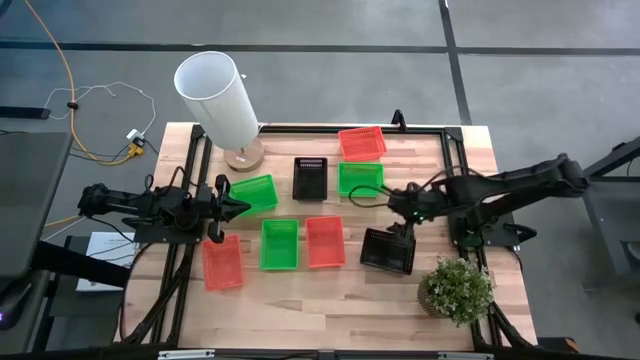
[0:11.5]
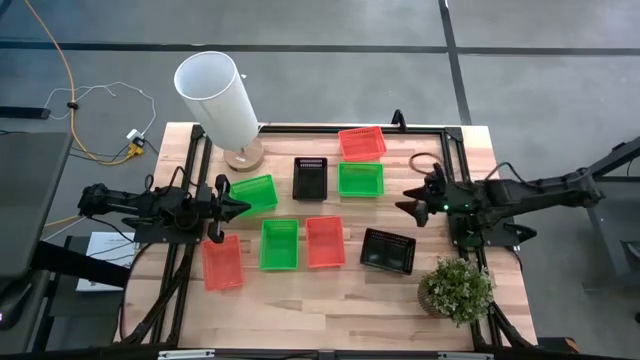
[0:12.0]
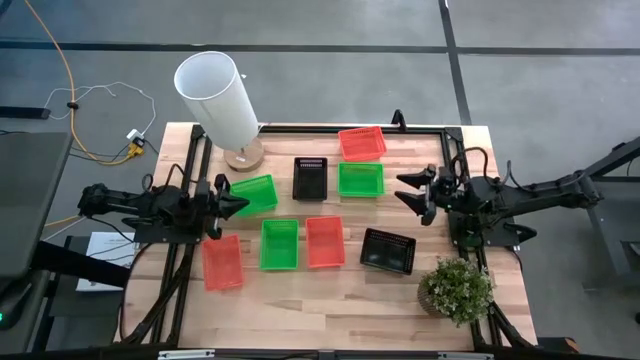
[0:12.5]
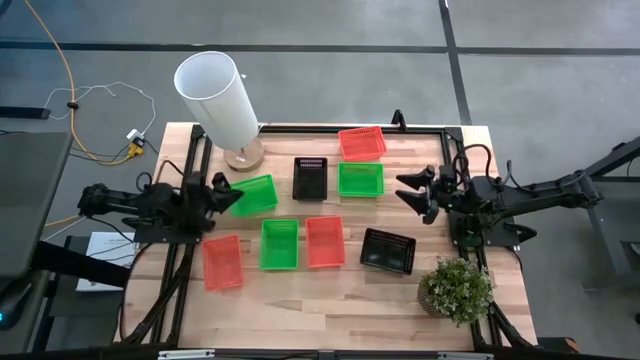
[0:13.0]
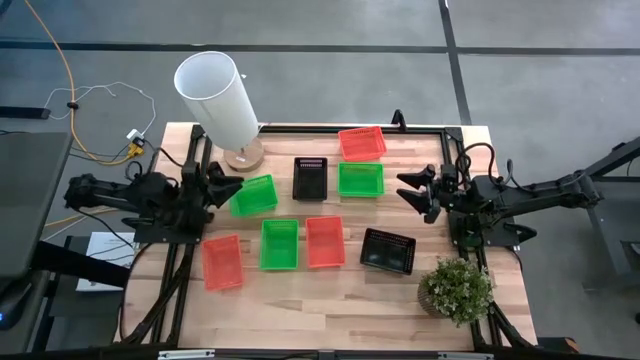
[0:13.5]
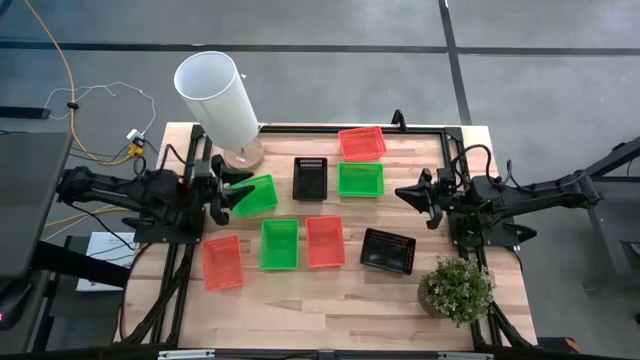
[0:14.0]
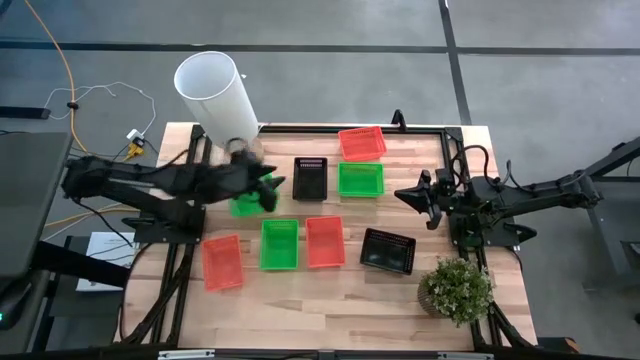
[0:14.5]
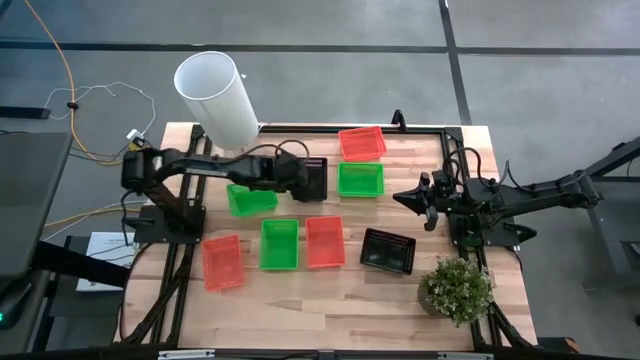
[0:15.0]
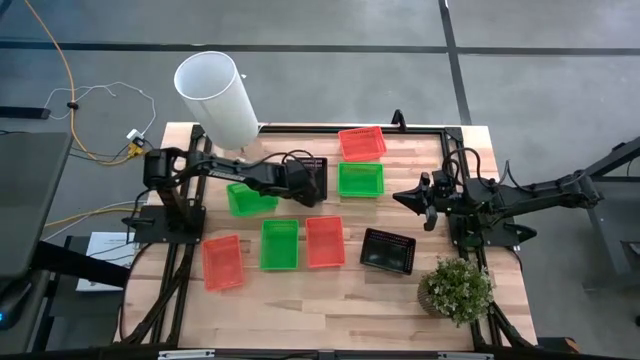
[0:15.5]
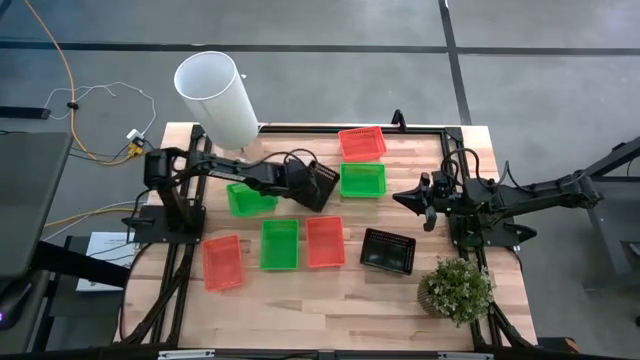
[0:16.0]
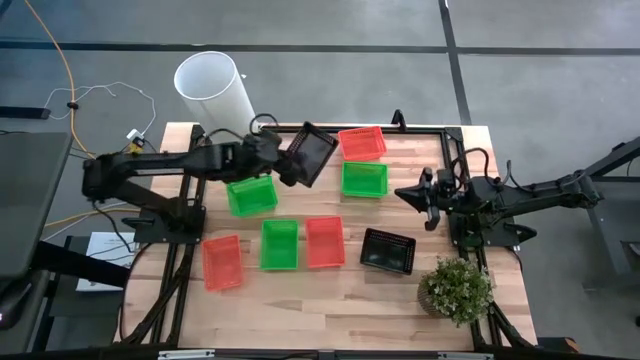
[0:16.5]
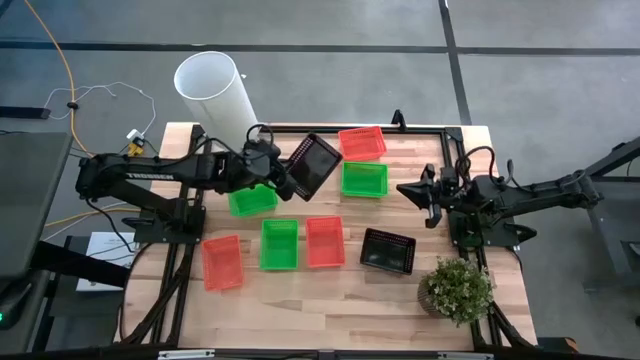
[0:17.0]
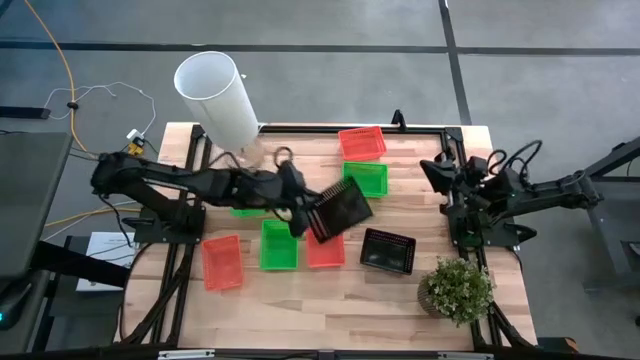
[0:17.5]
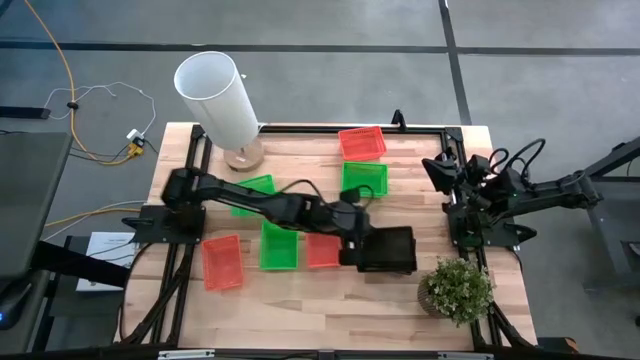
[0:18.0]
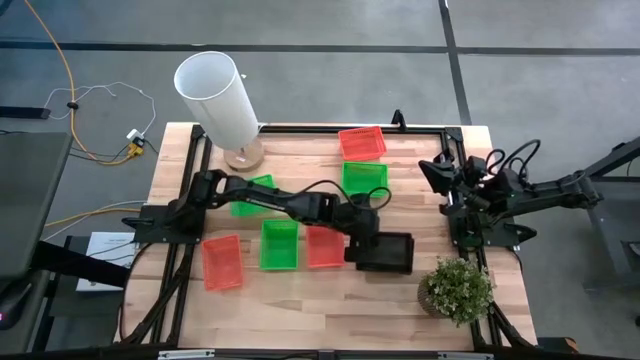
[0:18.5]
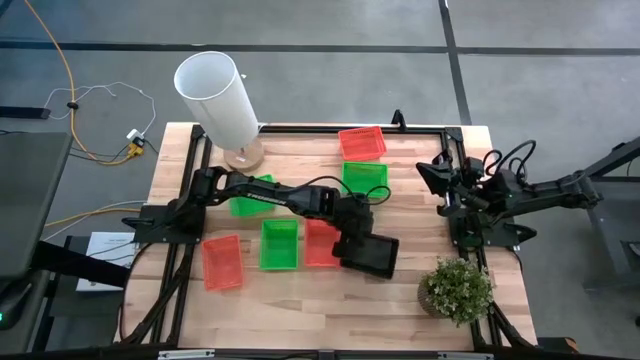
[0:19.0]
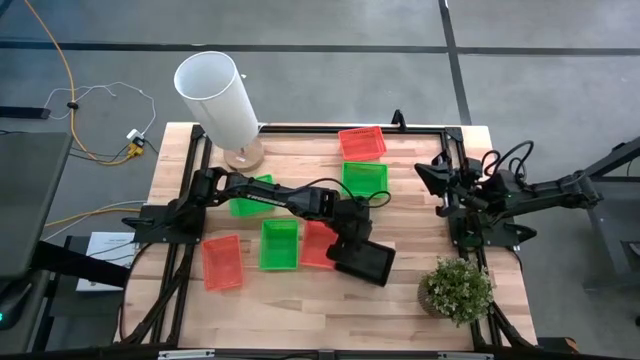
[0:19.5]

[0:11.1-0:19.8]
Stack the black bin on the black bin

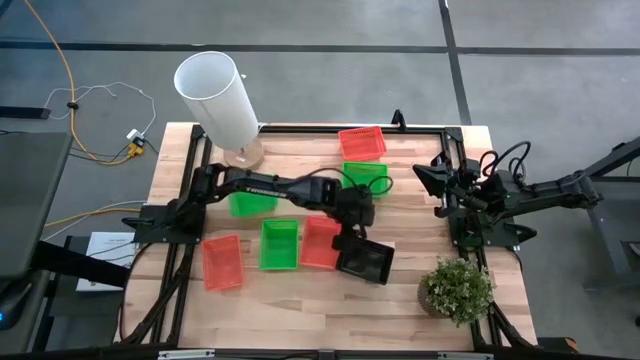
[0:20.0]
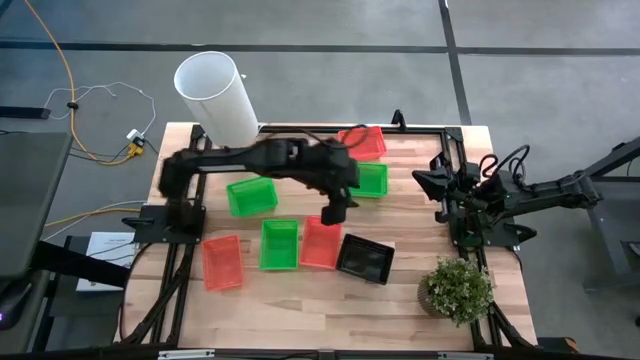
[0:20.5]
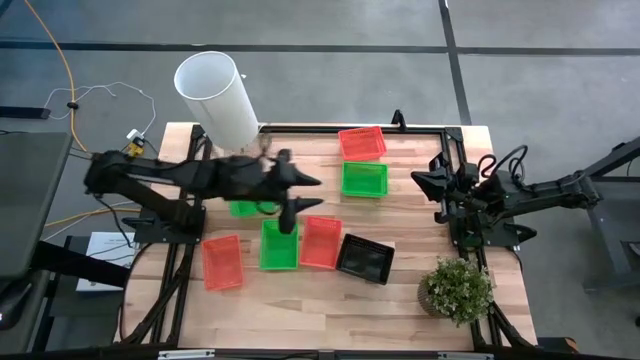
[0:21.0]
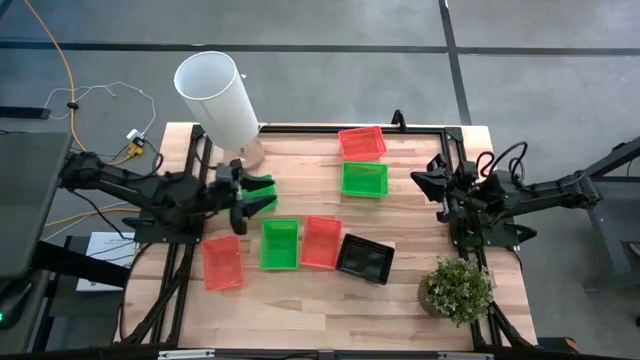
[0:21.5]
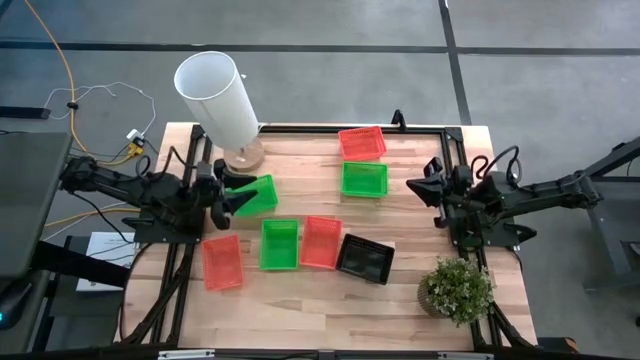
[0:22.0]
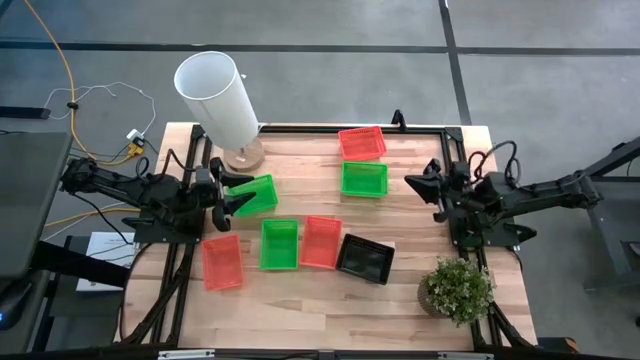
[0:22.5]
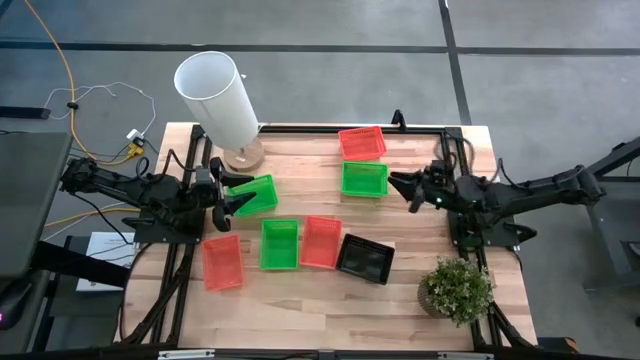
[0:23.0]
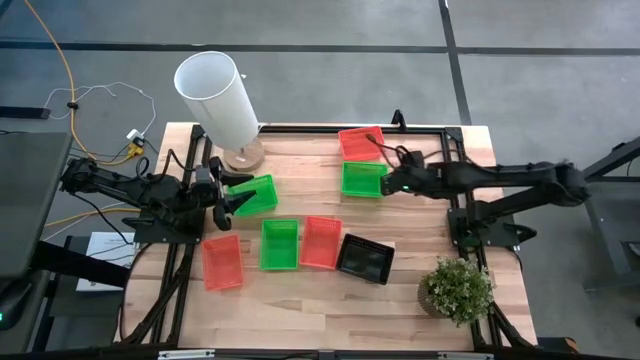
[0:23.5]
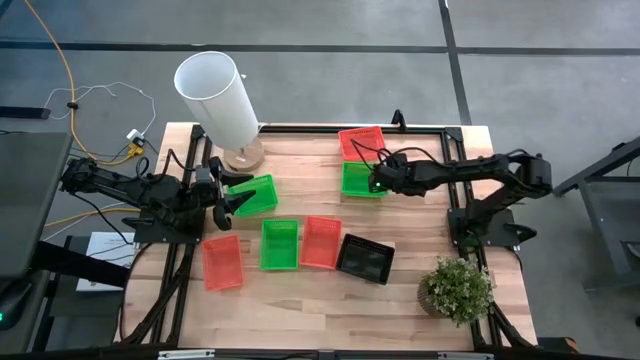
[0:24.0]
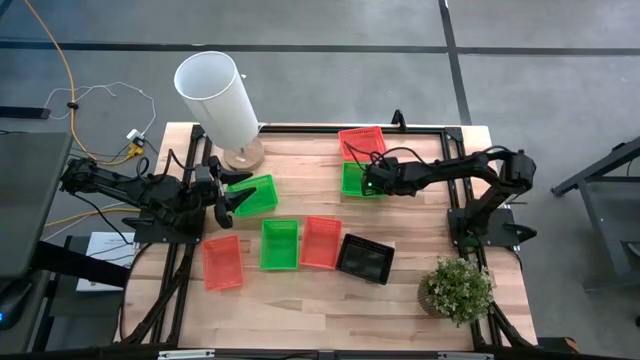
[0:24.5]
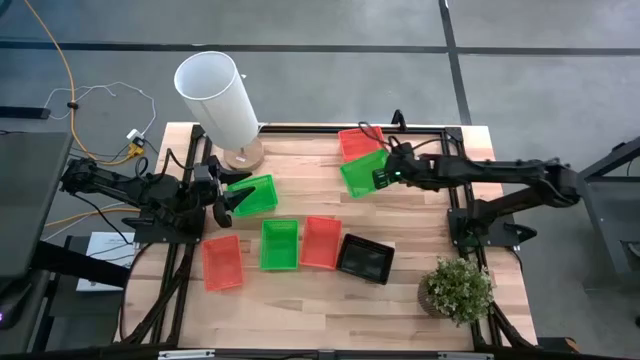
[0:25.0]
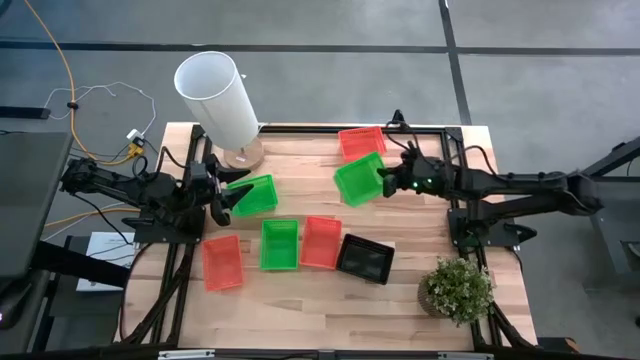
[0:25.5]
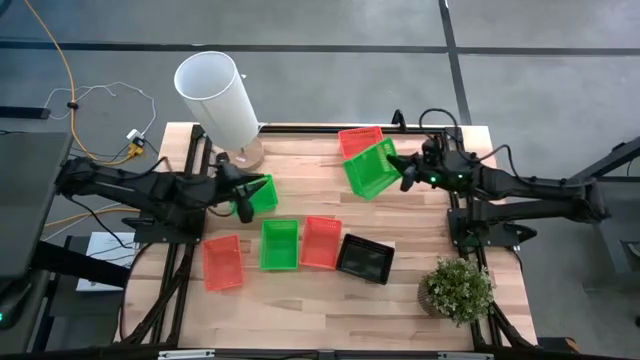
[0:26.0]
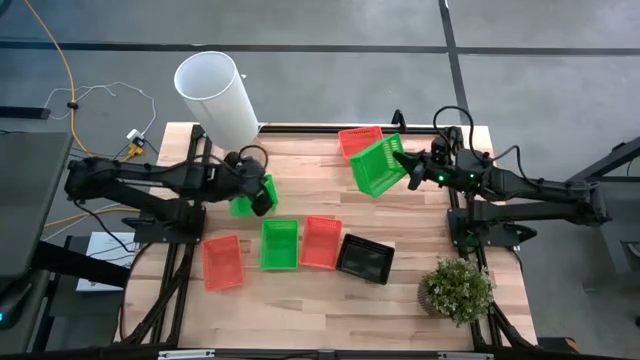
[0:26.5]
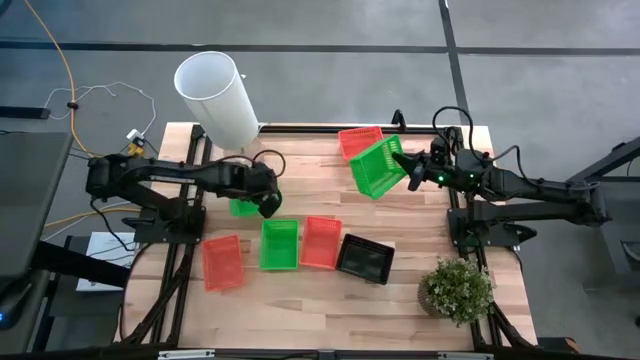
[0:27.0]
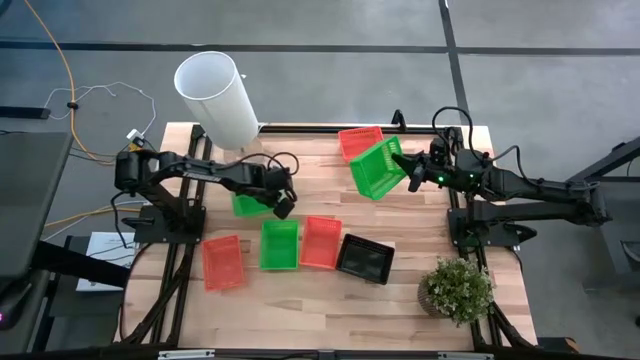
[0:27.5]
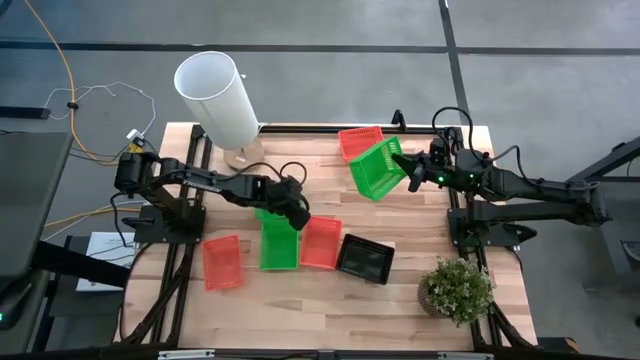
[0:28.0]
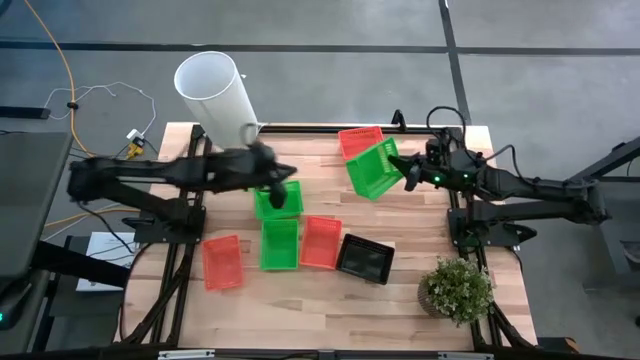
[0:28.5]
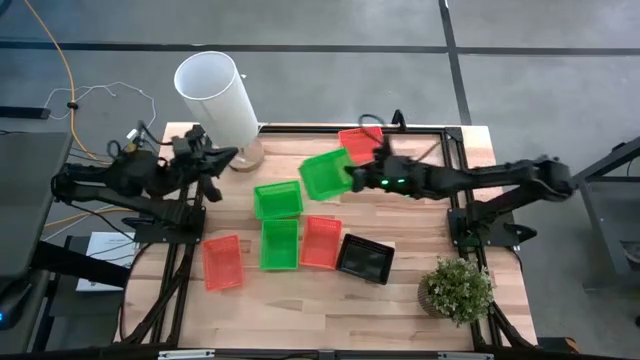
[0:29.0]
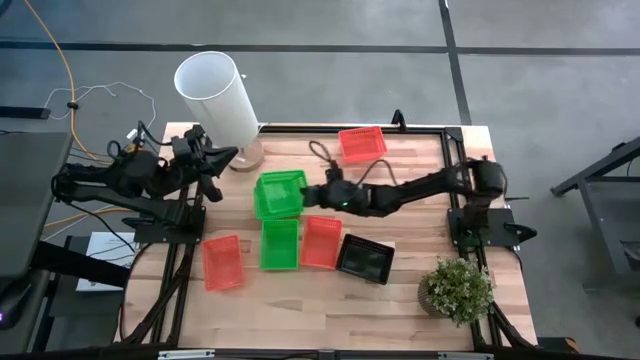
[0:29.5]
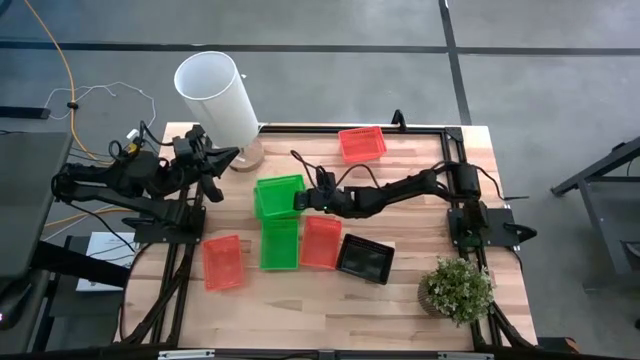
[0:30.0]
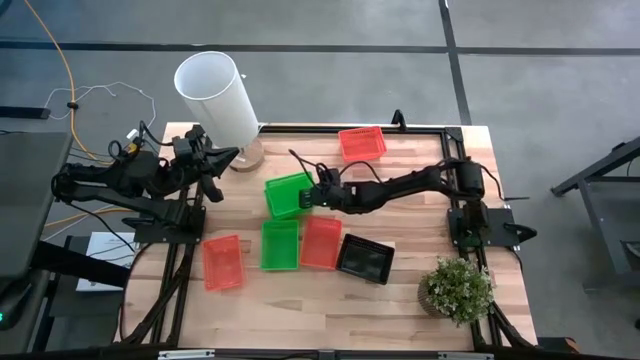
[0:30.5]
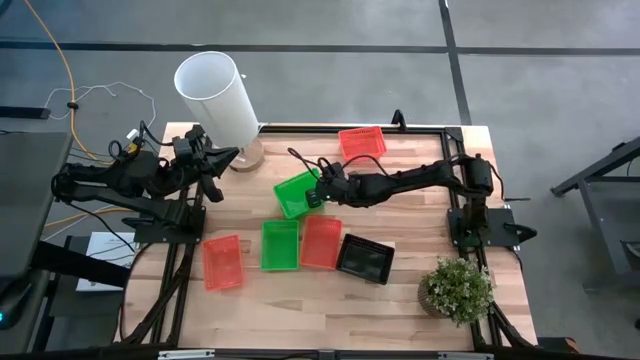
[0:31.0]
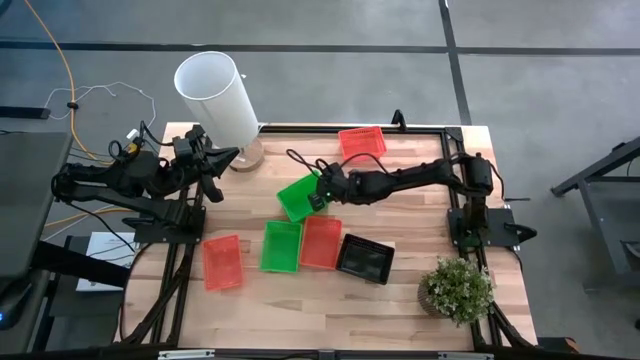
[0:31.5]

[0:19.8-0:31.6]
Stack the top right green bin on the top left green bin
